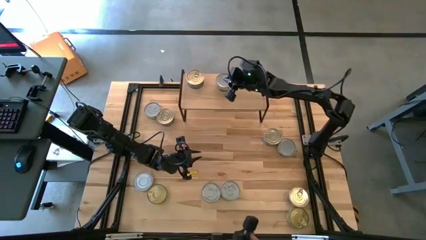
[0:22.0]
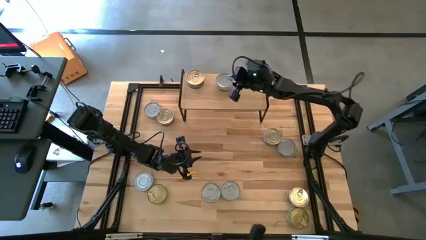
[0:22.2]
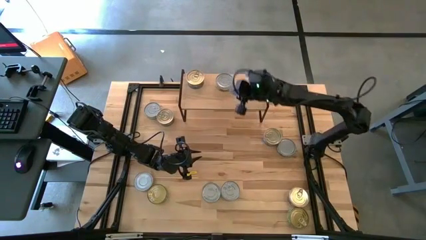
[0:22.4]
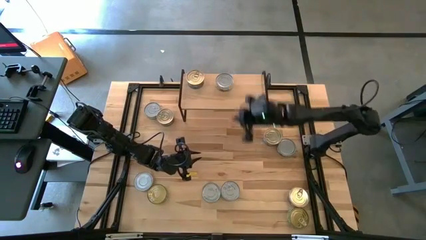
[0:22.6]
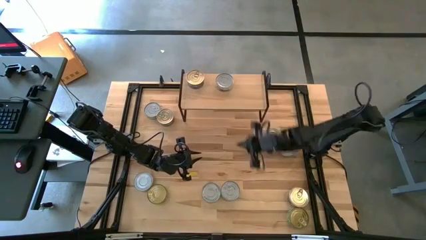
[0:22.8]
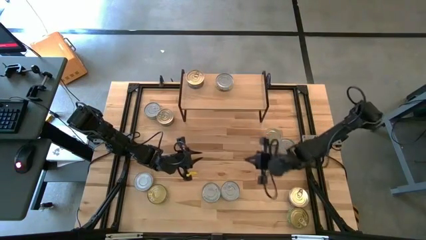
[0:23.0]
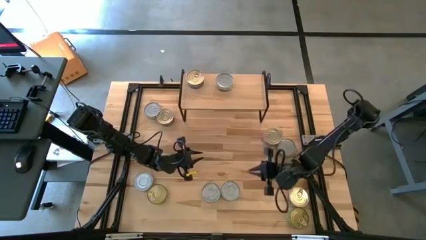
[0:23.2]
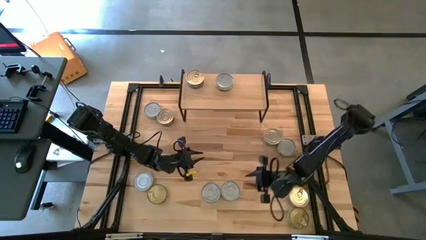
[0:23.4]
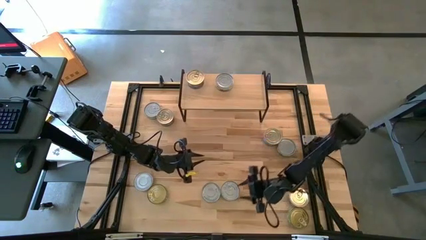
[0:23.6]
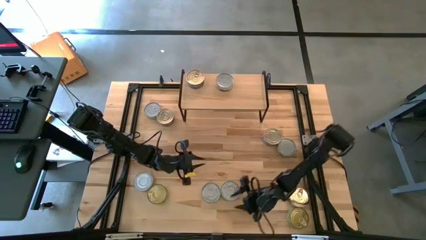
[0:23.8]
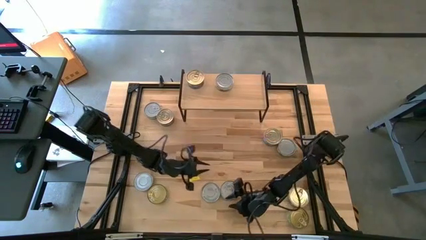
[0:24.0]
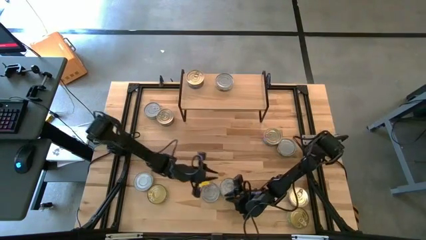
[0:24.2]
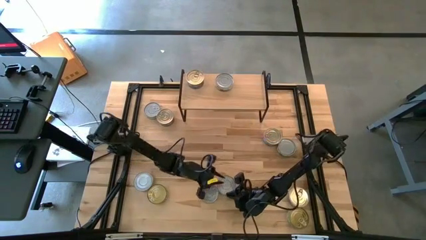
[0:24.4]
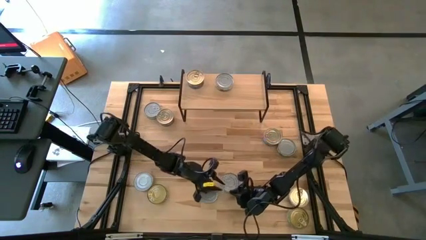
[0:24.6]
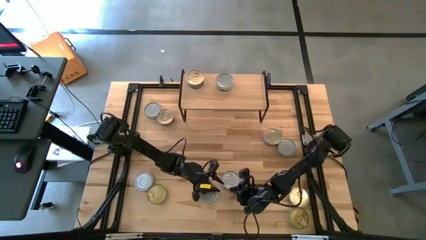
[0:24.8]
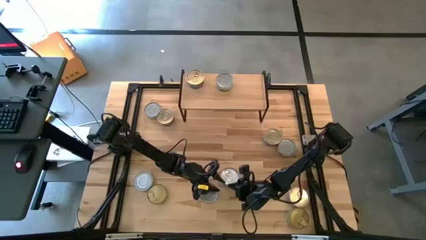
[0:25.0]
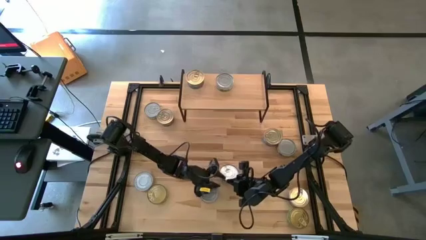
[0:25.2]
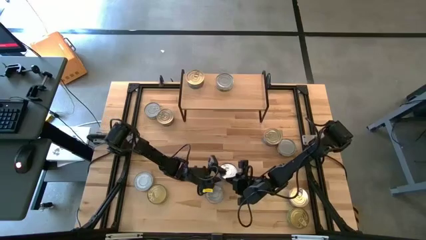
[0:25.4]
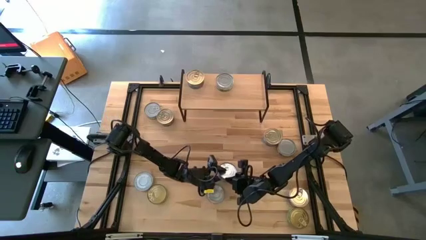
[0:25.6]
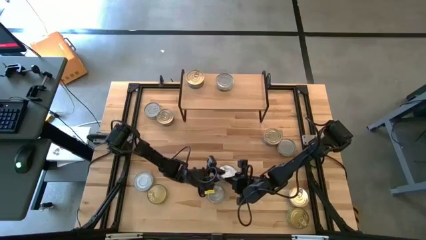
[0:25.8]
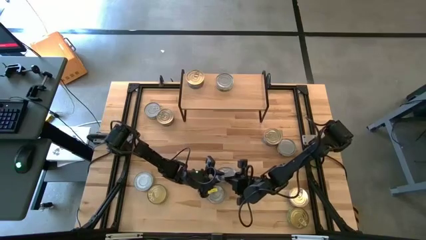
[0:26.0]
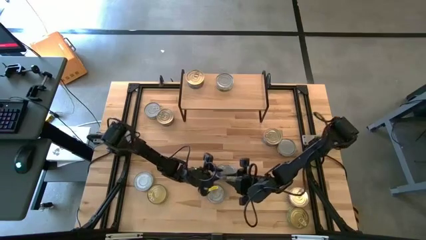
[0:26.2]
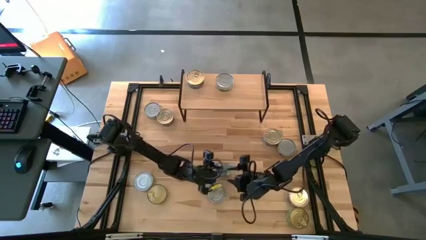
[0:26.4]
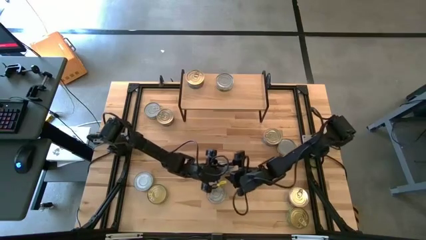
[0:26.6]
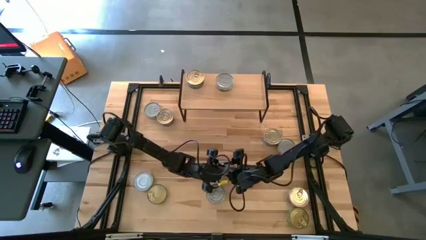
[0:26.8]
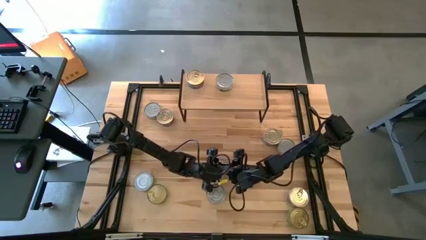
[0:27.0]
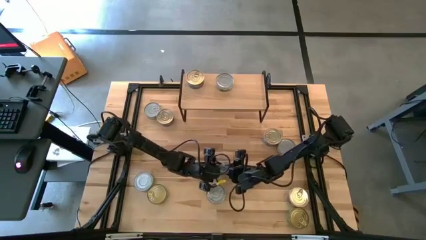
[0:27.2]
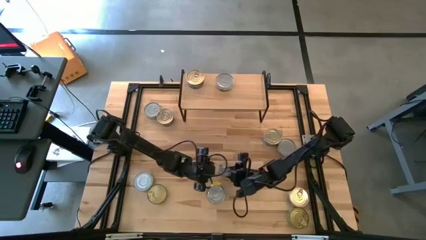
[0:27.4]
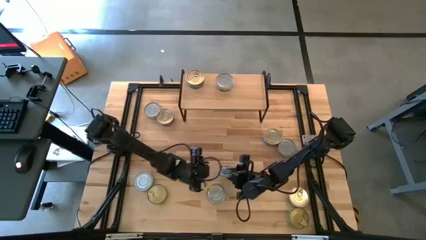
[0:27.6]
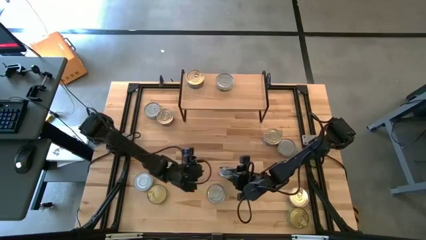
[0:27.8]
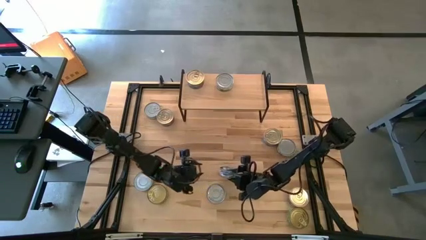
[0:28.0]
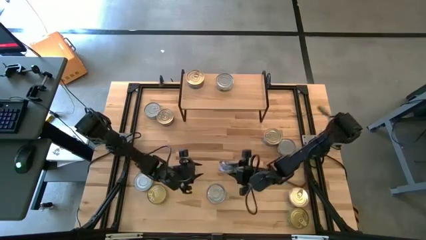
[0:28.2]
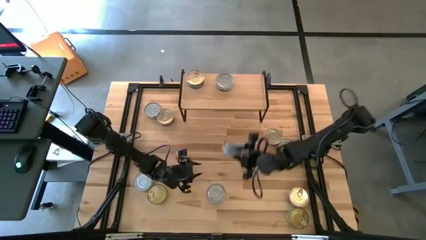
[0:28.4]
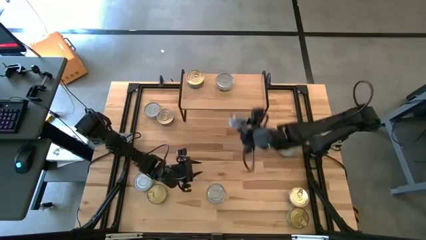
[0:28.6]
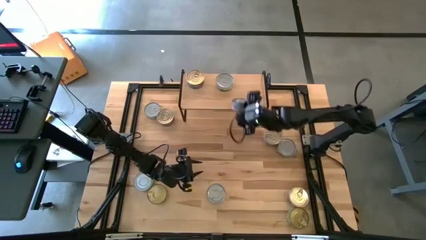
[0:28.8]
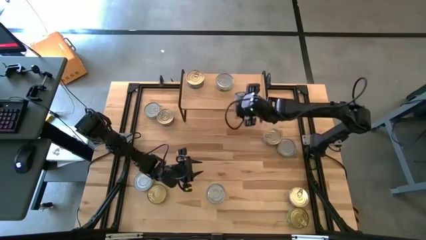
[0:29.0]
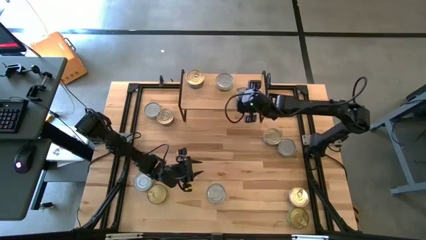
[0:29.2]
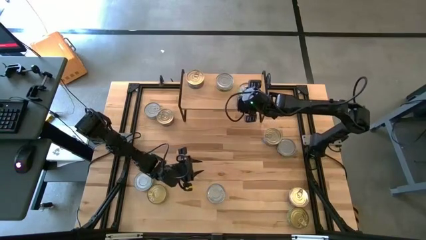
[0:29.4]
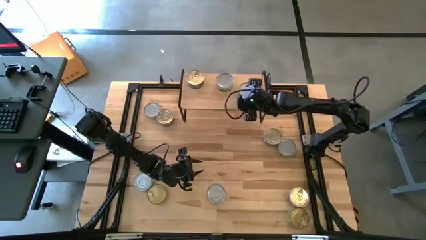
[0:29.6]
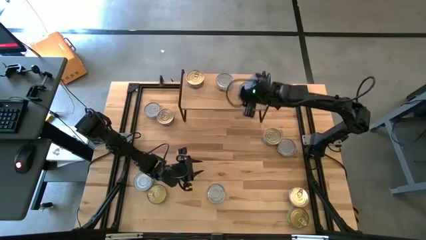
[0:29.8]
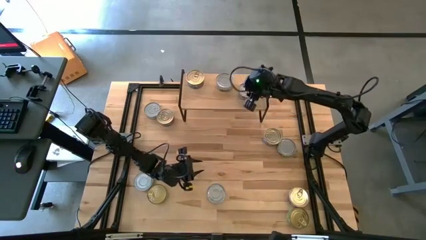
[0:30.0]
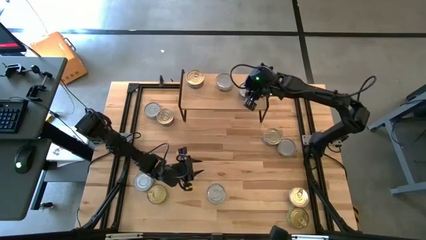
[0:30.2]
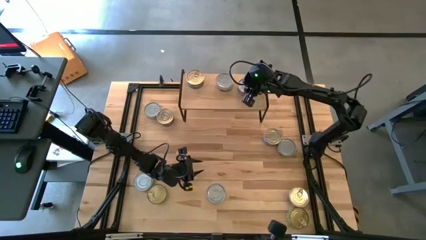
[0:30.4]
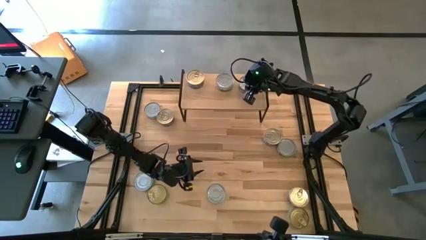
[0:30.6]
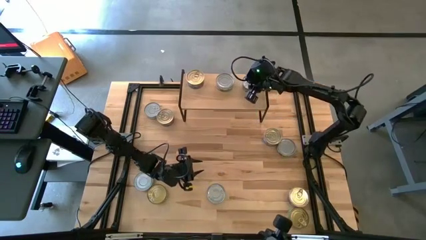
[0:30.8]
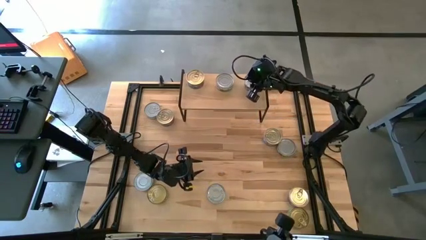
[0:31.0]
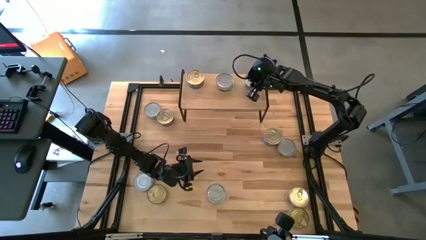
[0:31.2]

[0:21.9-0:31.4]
Task: Stack canned seafood by type on shelf
Put the green tuna can on the shelf

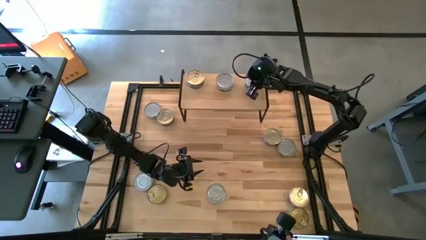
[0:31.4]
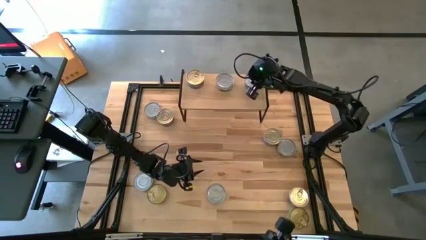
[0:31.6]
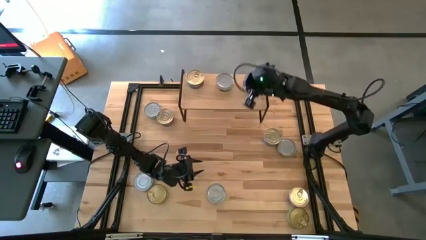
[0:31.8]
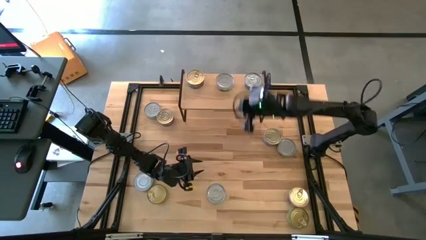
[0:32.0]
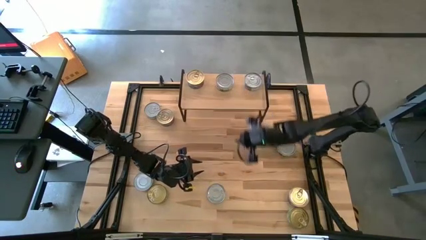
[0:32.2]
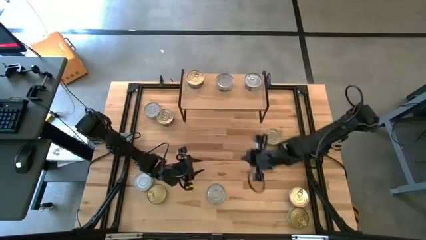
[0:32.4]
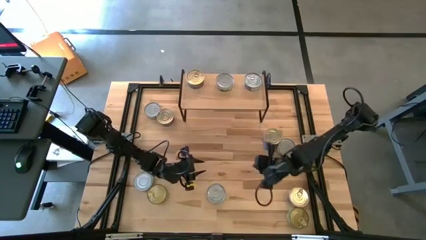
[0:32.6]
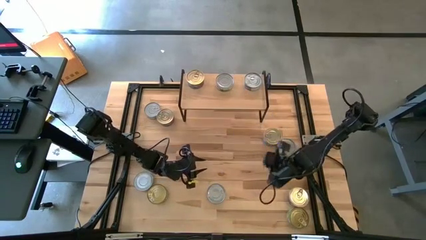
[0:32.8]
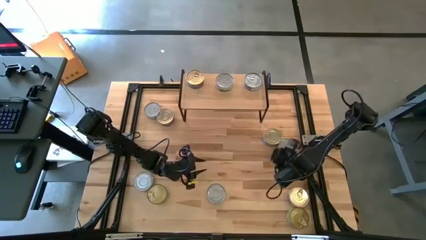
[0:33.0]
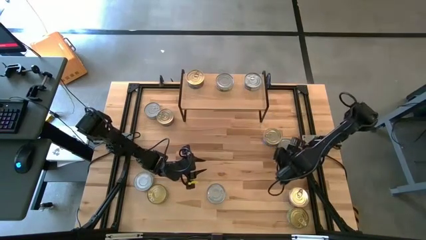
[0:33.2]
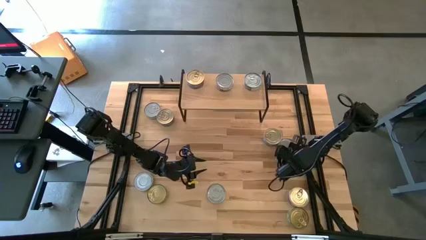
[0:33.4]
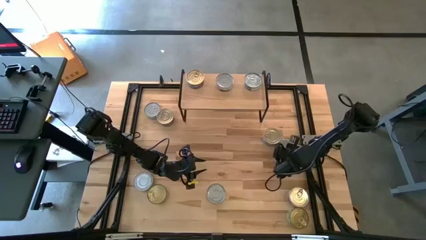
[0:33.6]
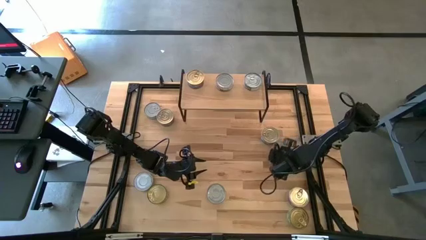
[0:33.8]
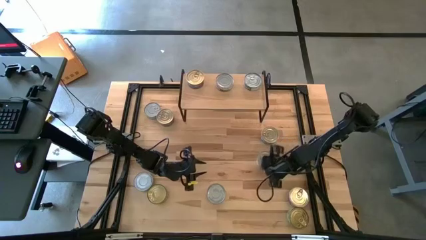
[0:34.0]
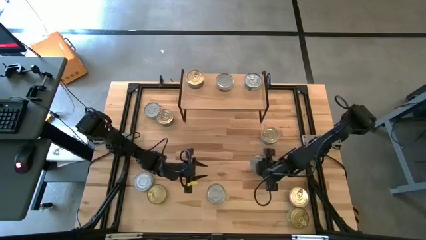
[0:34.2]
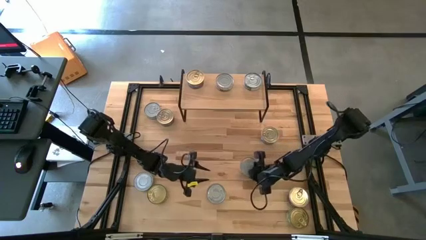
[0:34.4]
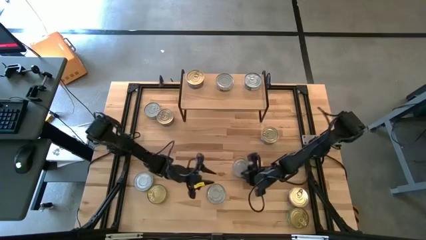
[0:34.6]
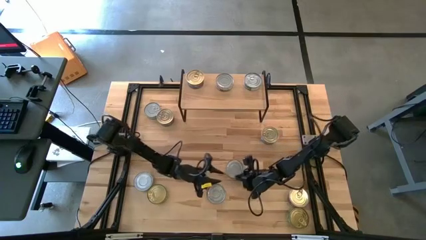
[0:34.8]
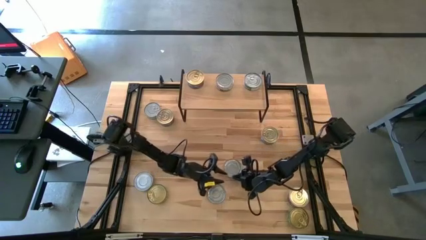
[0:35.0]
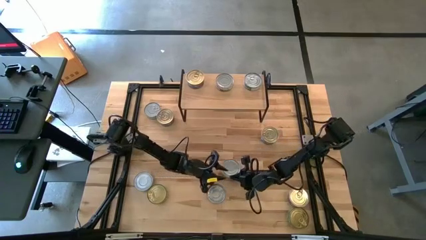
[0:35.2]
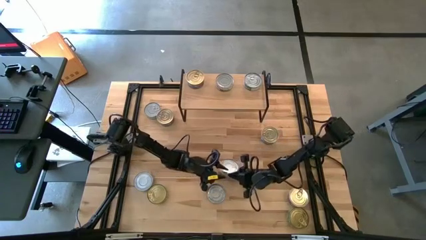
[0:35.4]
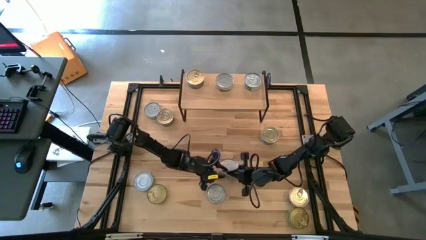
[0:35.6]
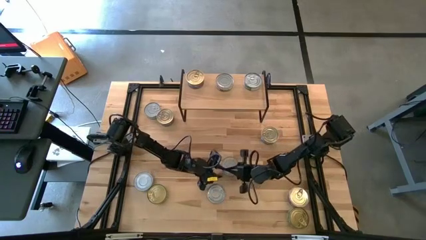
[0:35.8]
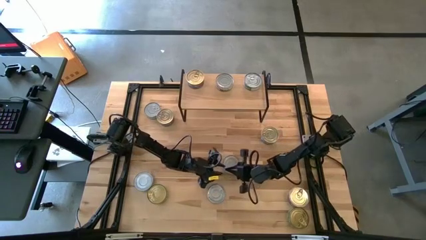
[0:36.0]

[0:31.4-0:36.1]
Put the green white tuna can aligned with the other green white tuna can on the shelf

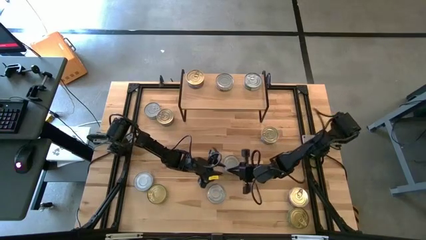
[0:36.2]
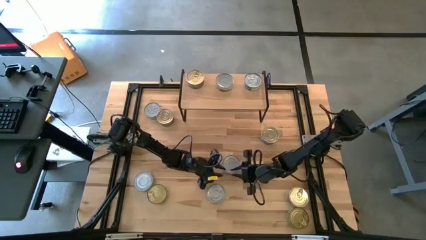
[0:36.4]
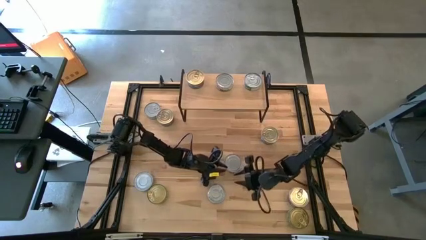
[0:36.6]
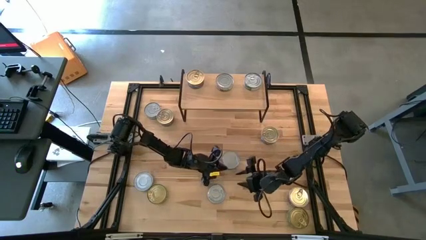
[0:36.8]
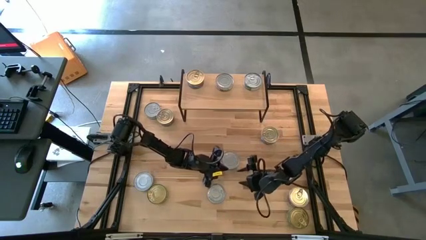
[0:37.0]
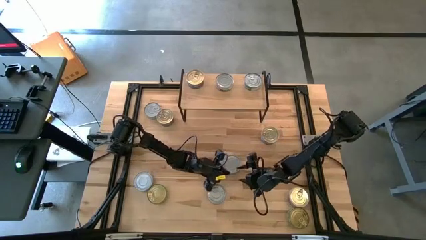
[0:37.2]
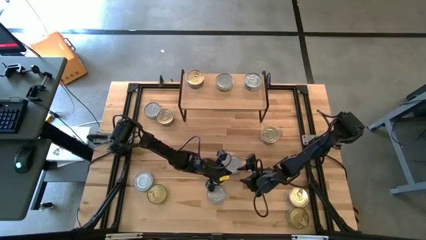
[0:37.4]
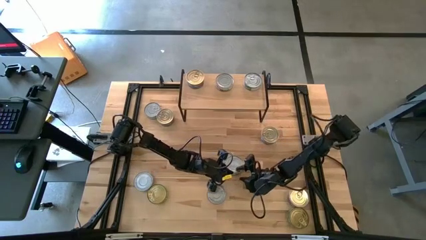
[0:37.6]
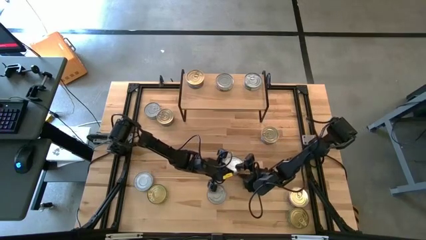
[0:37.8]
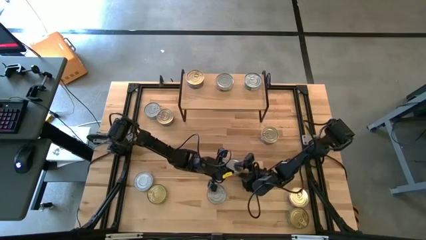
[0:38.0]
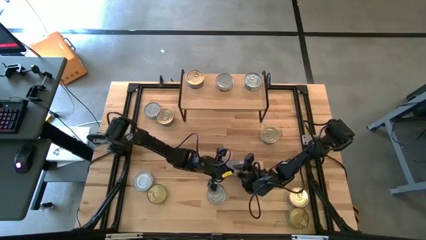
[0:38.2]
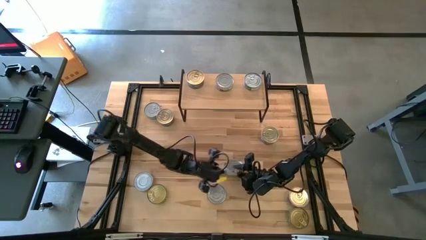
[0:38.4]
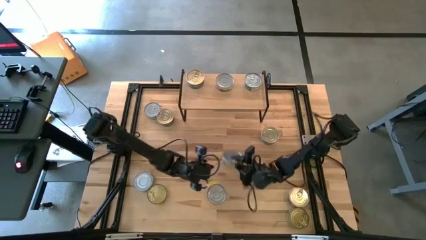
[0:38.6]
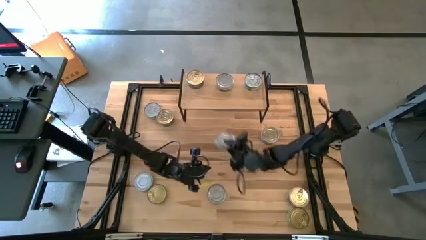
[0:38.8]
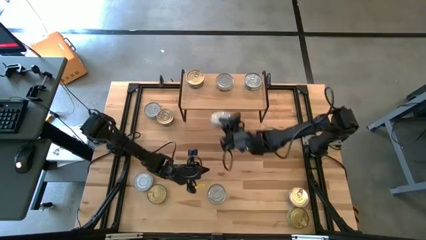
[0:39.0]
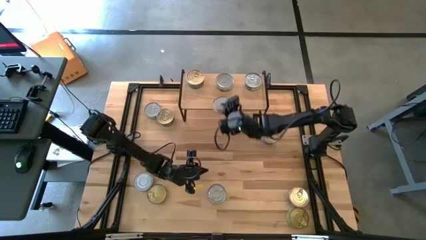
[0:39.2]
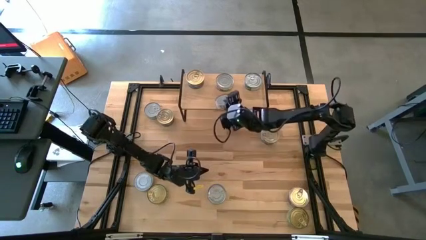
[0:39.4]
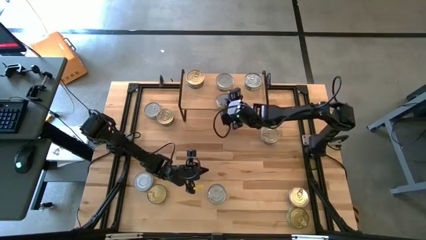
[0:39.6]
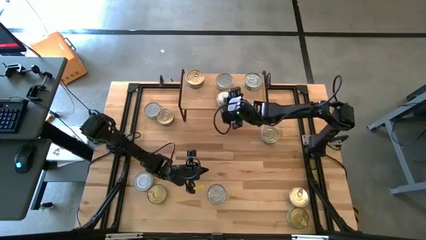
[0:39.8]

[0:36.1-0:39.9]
Put the green white tuna can aligned with the other green white tuna can on the shelf
